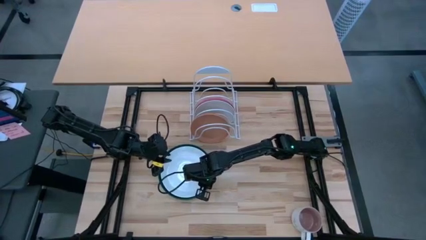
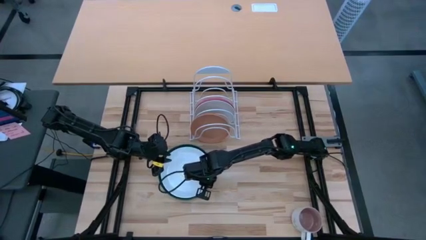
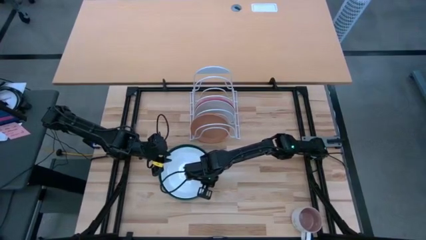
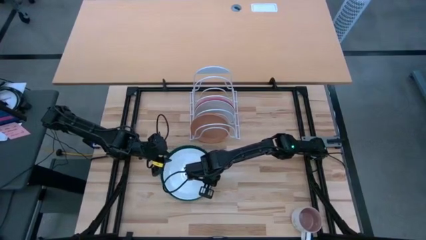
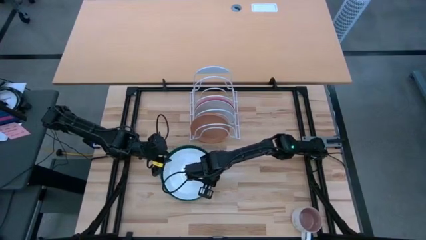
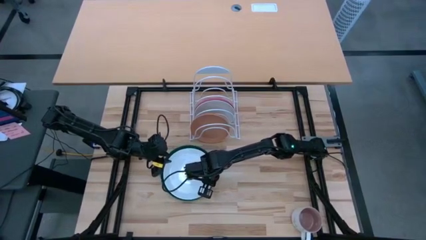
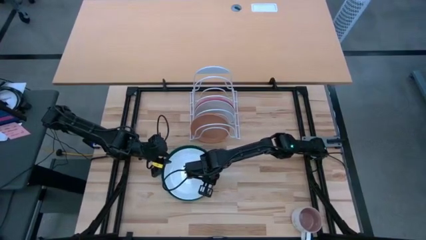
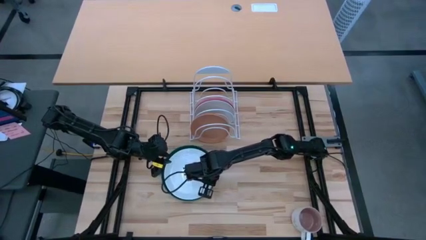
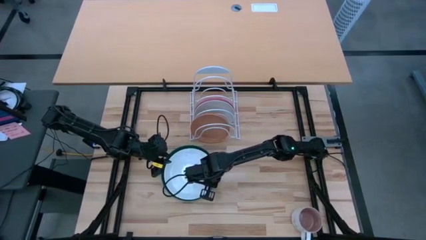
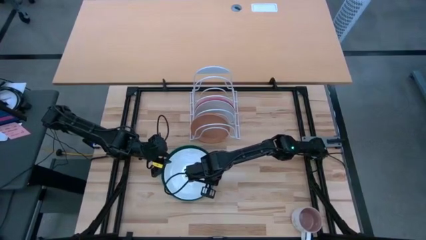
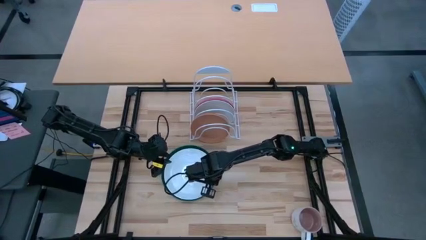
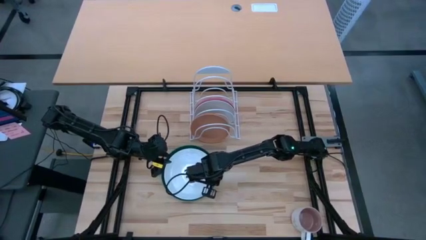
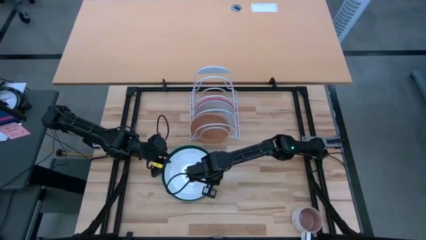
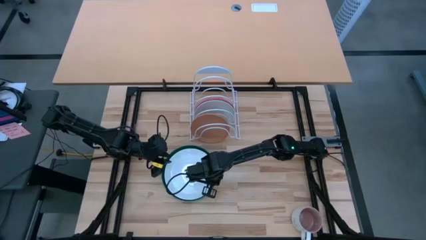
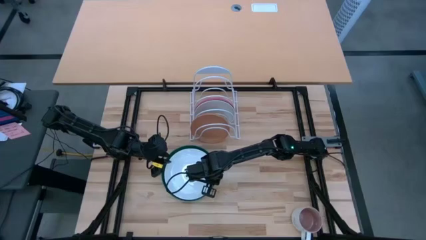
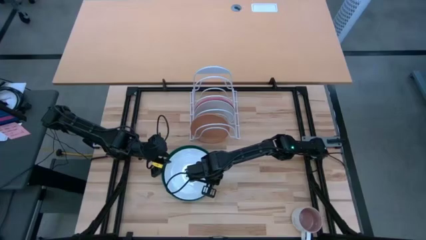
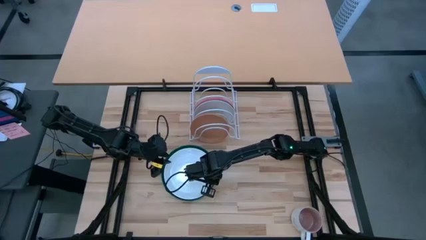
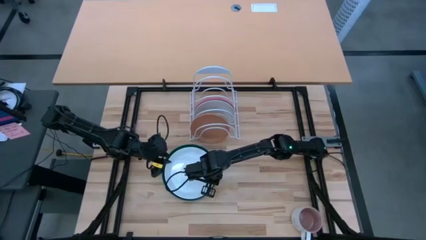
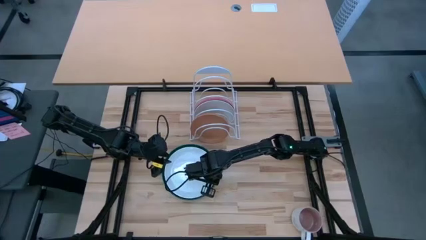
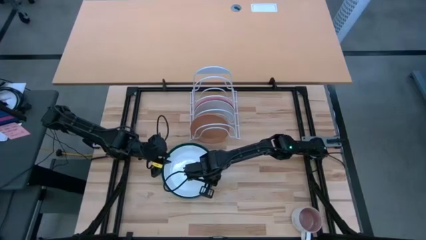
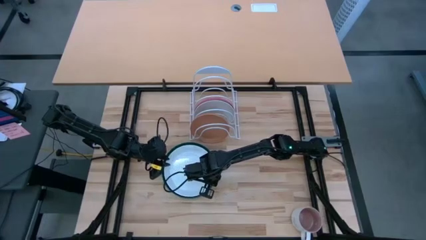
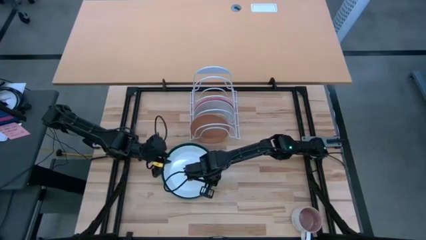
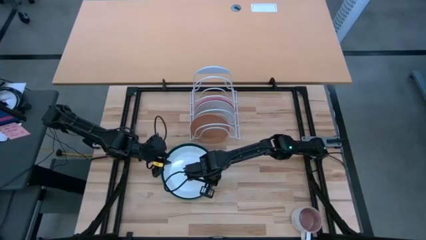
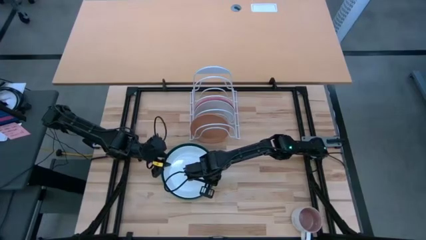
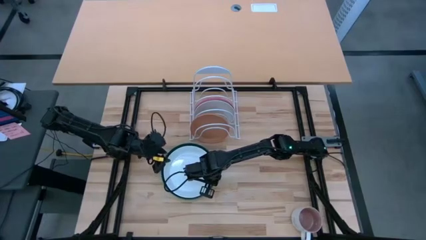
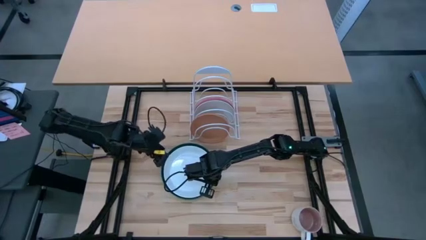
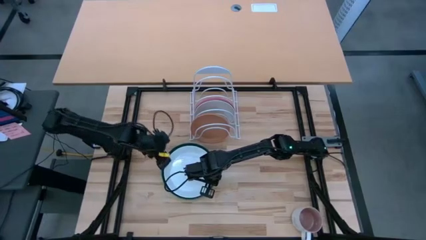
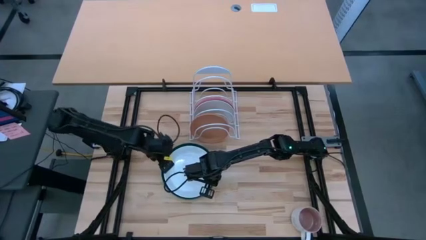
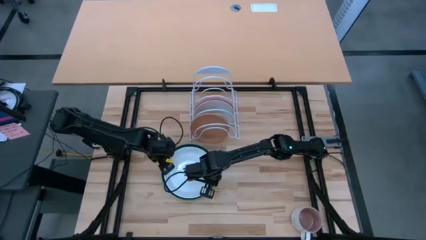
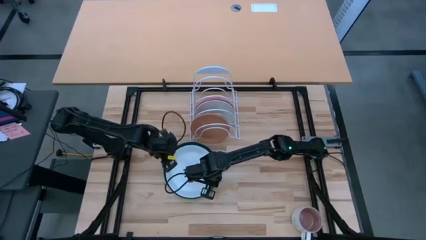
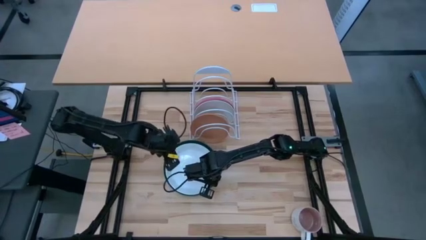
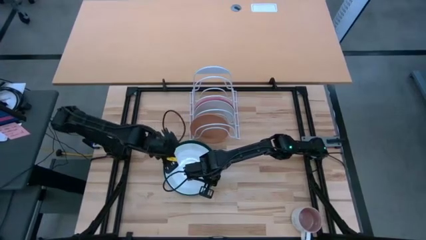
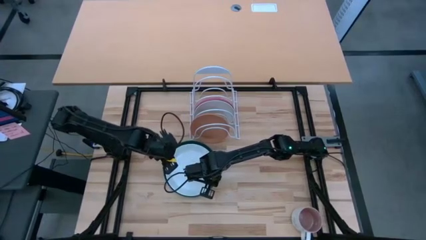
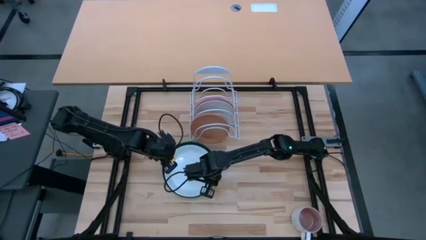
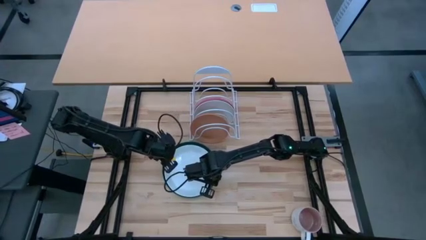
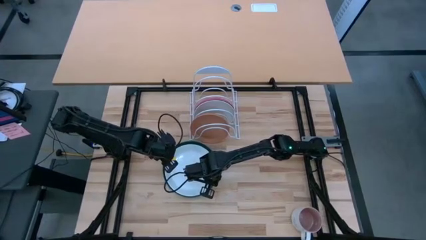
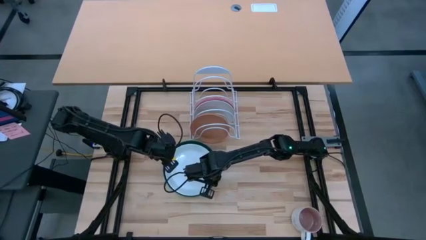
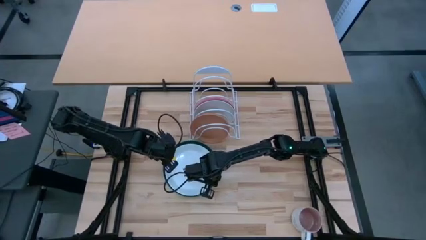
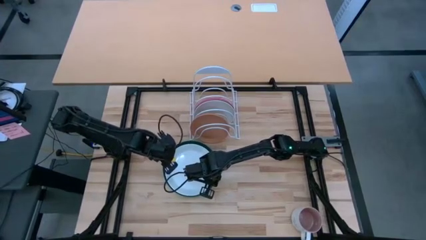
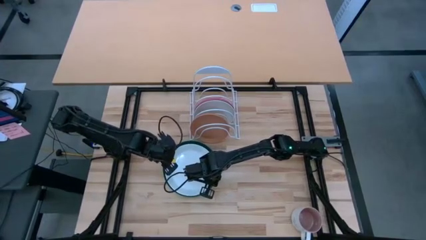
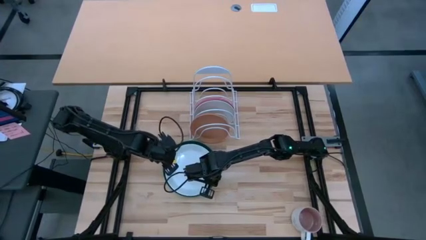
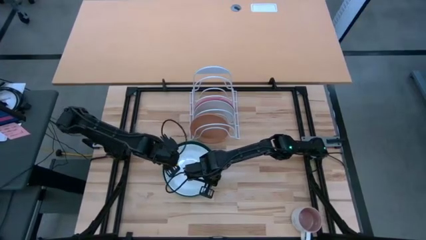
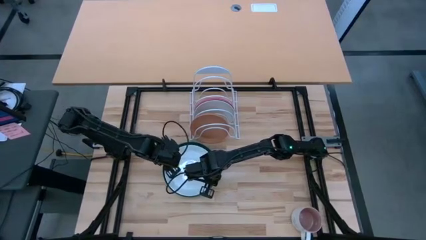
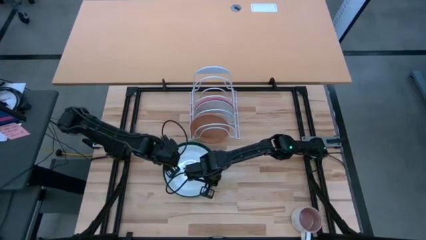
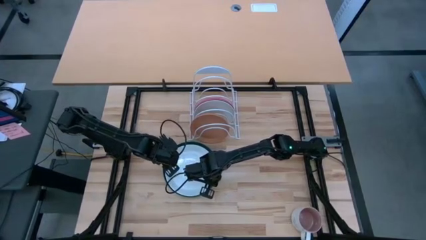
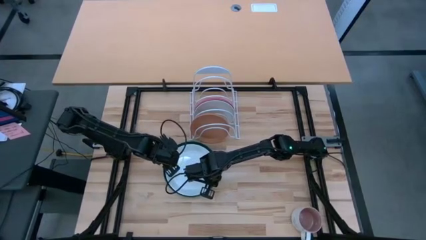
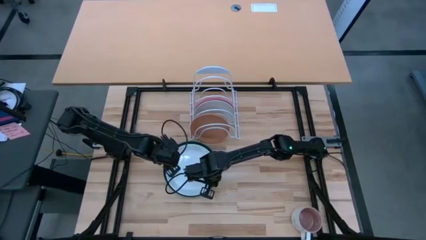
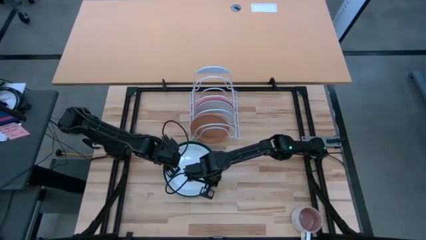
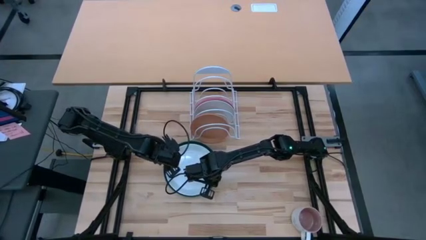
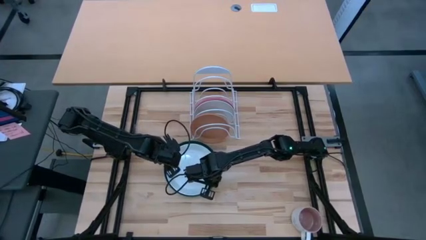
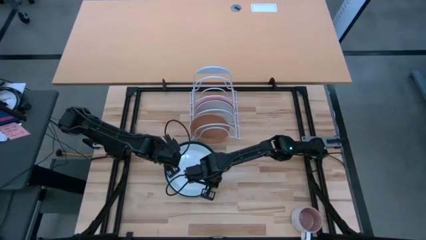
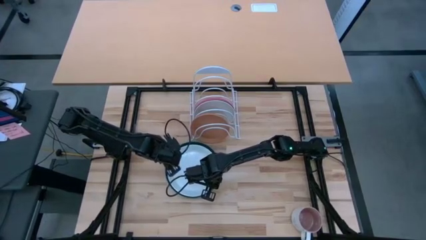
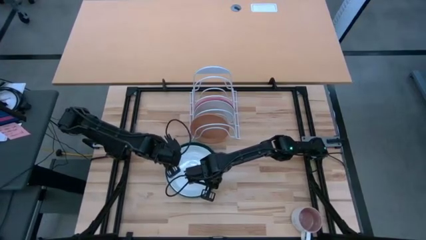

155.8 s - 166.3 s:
Task: Sort dishes
Put the white plate on the dish rack

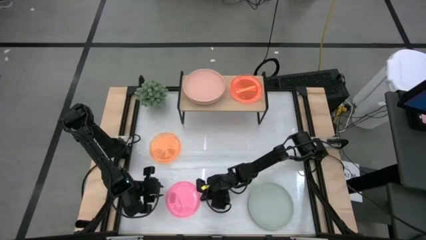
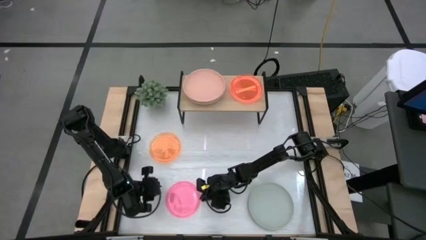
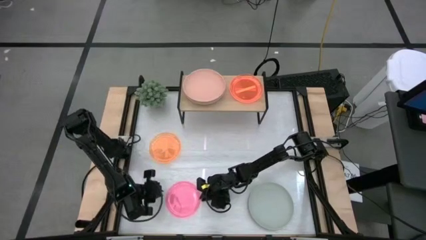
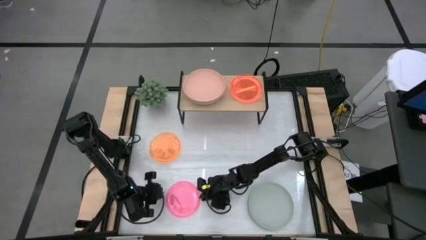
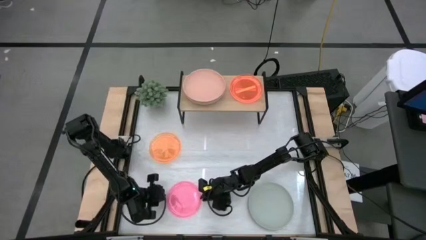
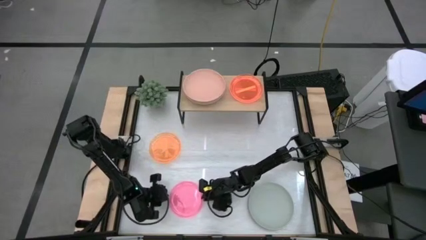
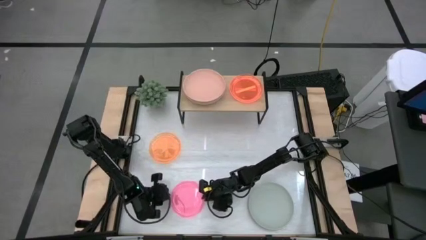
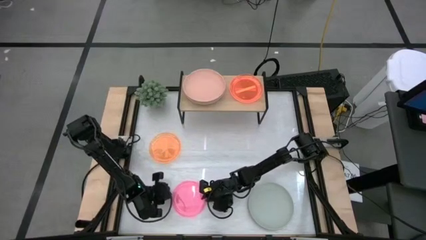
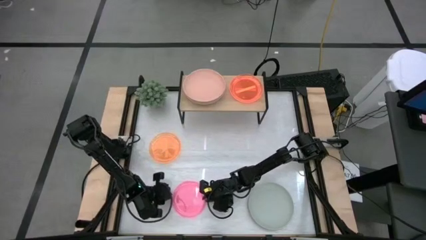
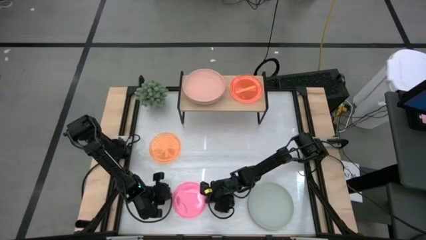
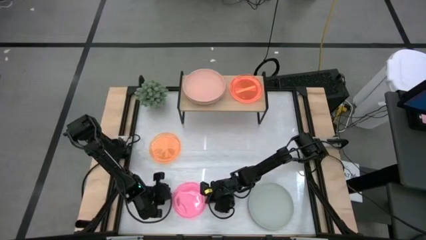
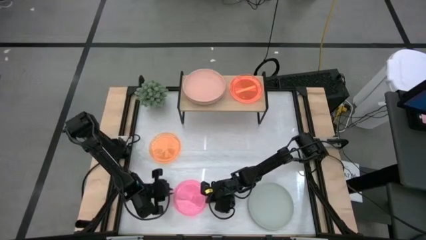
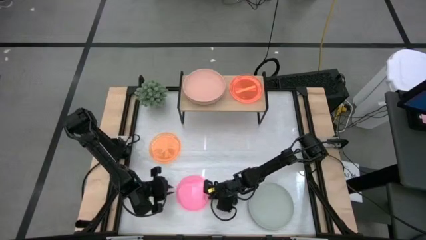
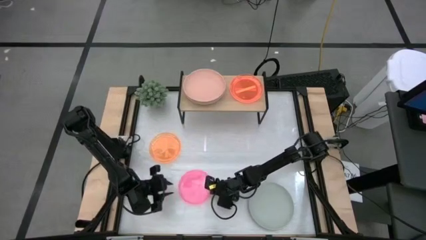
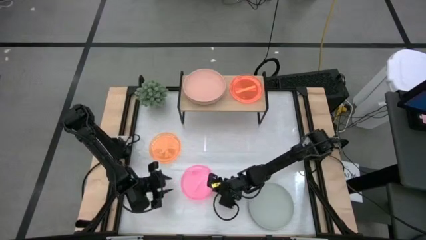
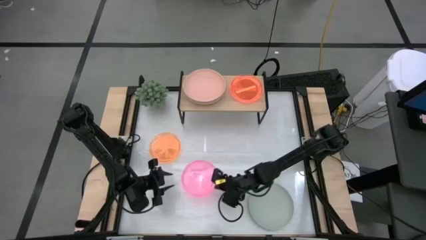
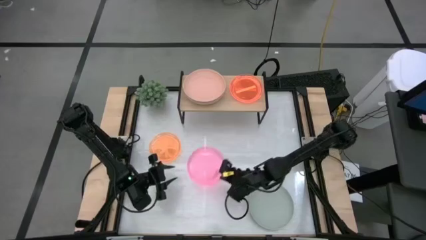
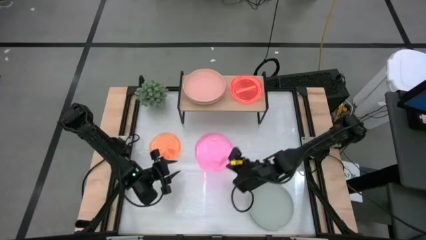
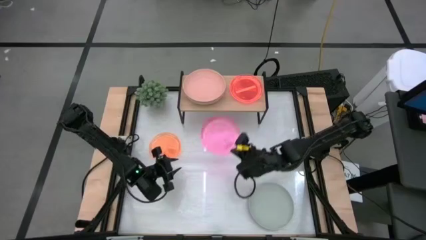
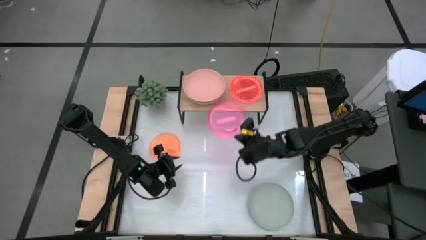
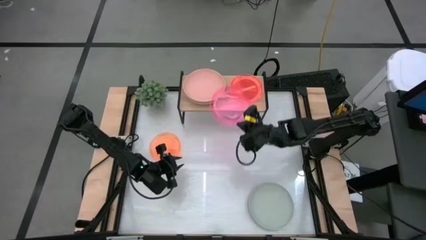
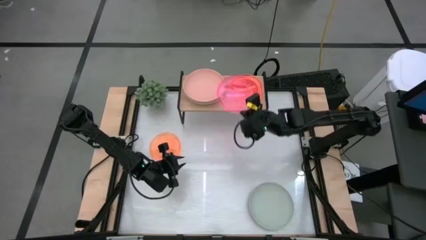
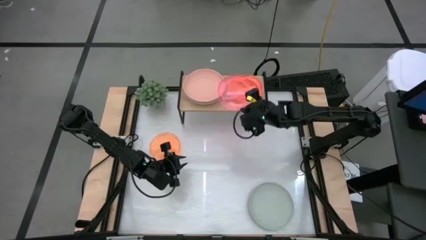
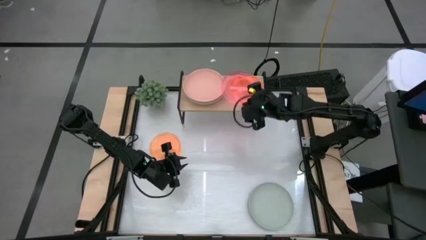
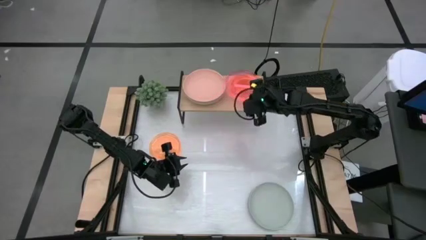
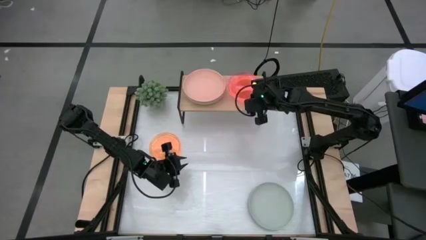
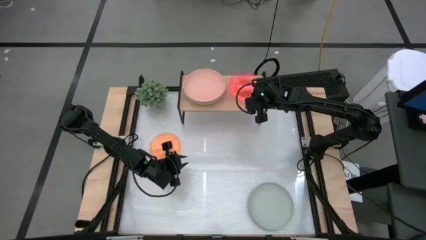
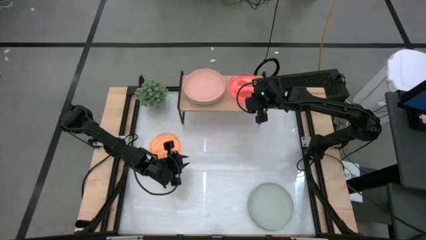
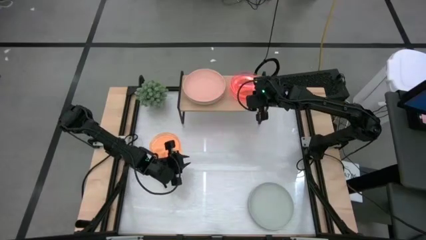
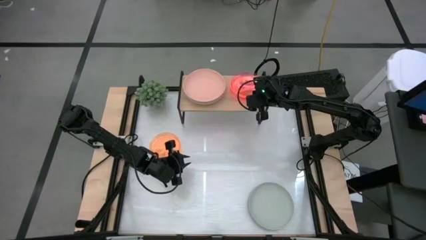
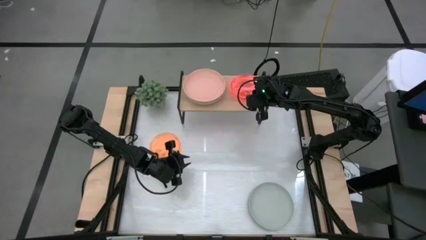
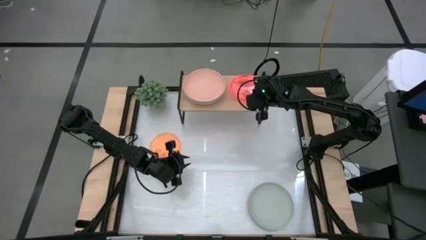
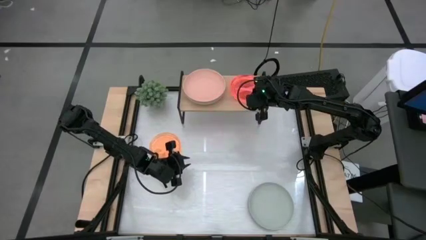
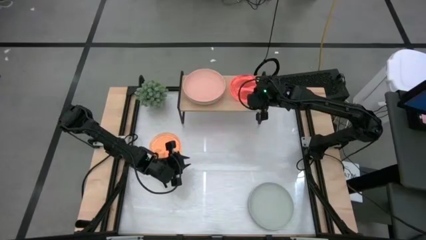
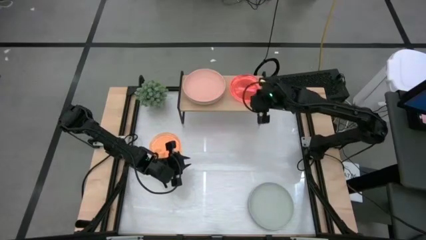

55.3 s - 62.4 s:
Task: Place and stack plates onto a shelf
Stack the pink plate on on top of the orange transparent plate
